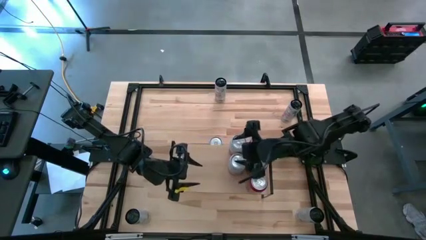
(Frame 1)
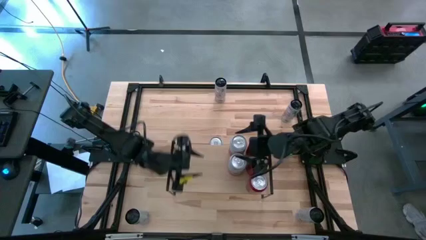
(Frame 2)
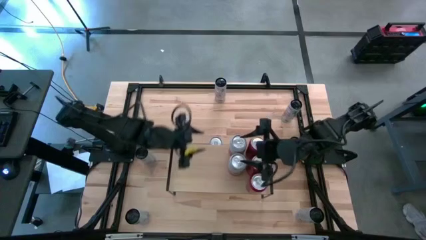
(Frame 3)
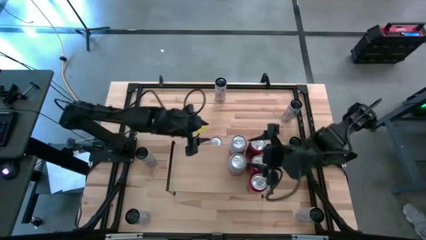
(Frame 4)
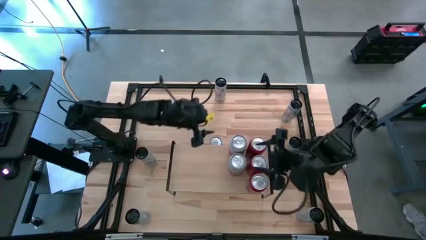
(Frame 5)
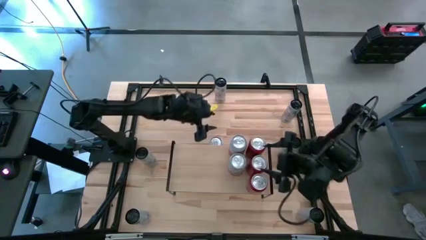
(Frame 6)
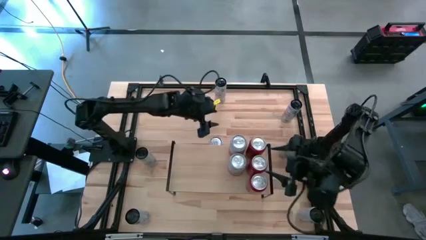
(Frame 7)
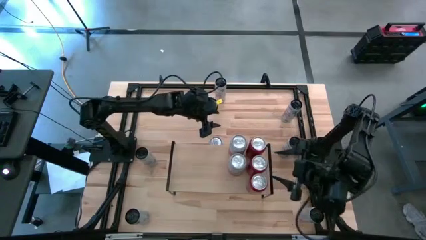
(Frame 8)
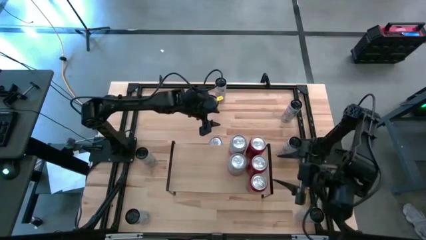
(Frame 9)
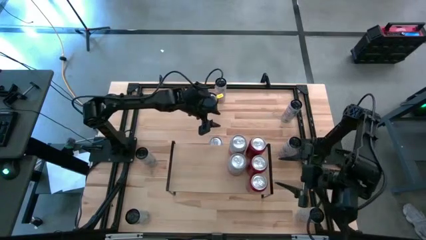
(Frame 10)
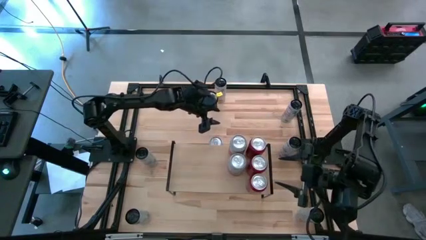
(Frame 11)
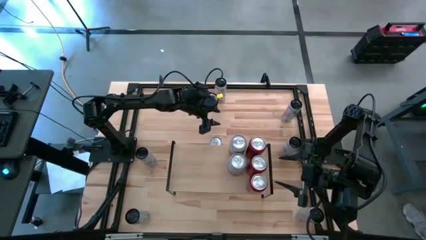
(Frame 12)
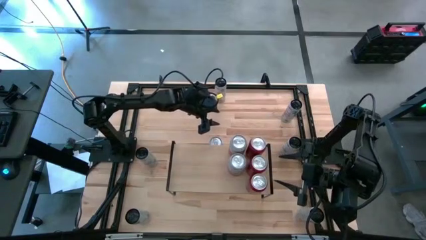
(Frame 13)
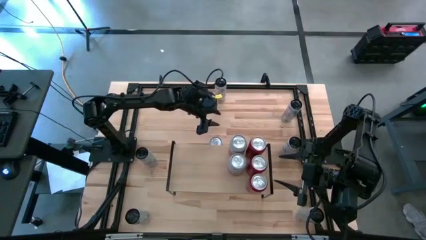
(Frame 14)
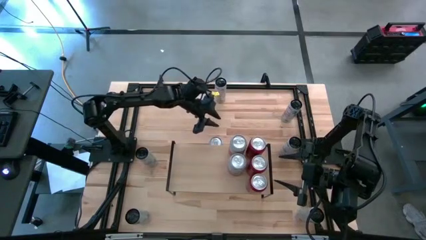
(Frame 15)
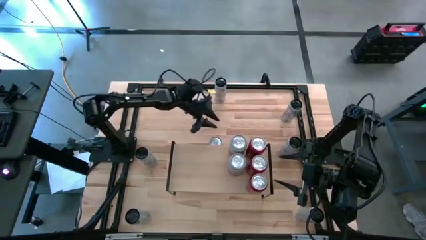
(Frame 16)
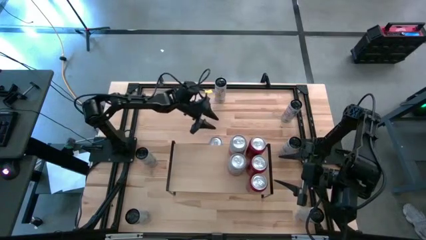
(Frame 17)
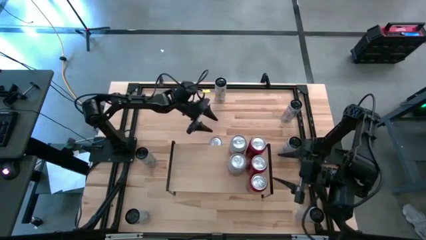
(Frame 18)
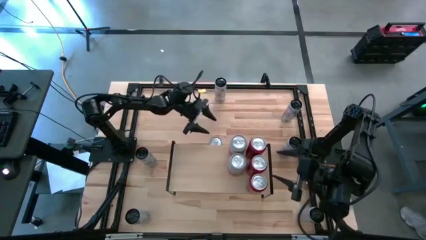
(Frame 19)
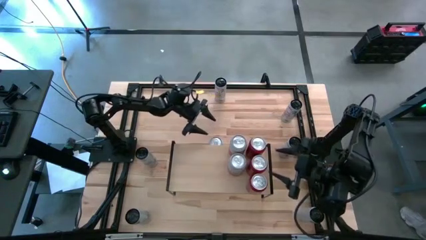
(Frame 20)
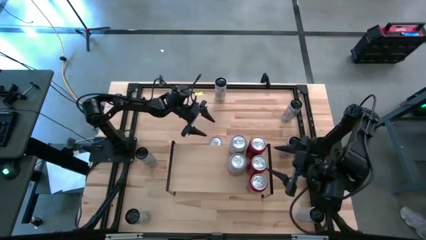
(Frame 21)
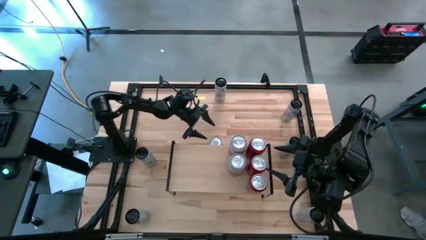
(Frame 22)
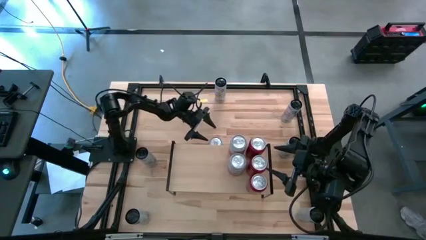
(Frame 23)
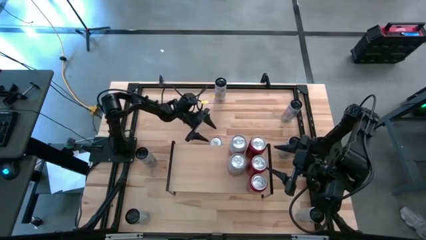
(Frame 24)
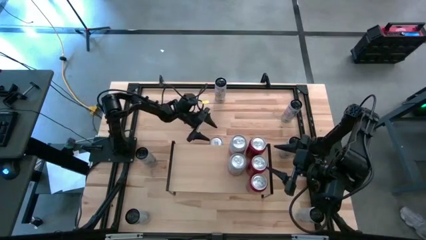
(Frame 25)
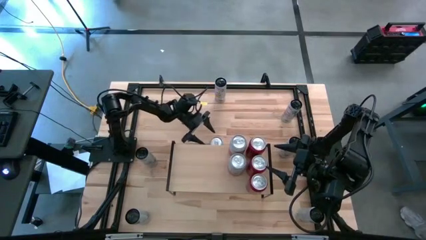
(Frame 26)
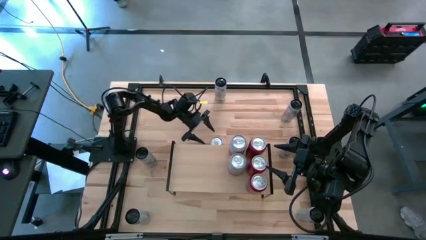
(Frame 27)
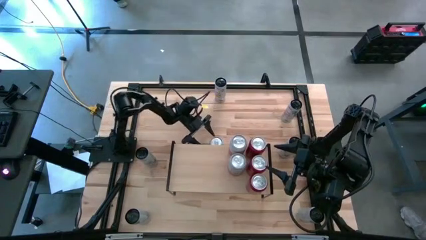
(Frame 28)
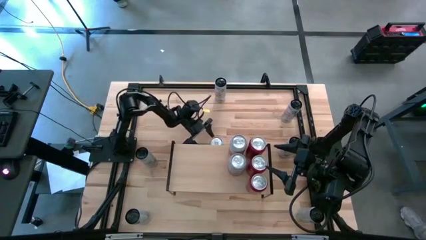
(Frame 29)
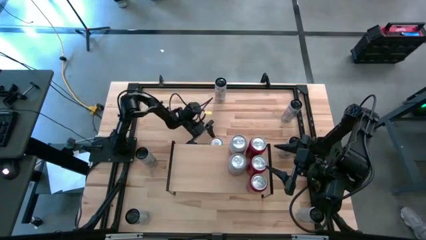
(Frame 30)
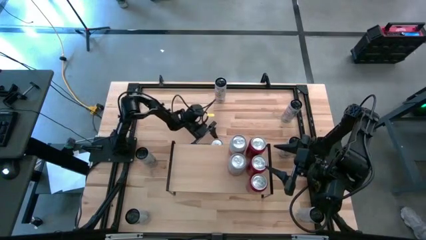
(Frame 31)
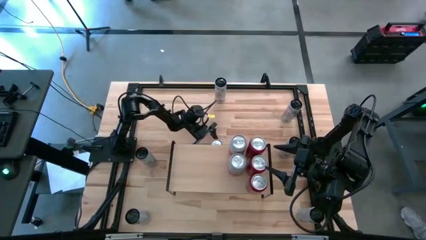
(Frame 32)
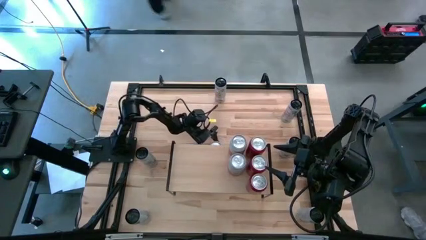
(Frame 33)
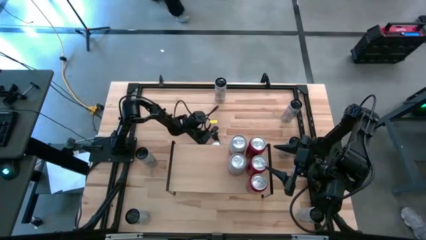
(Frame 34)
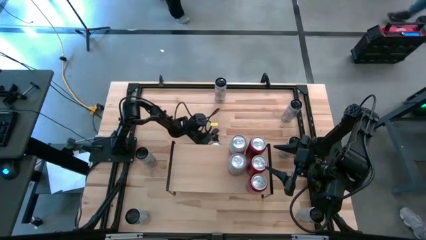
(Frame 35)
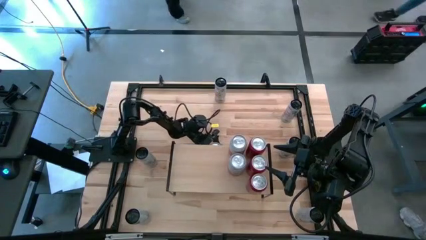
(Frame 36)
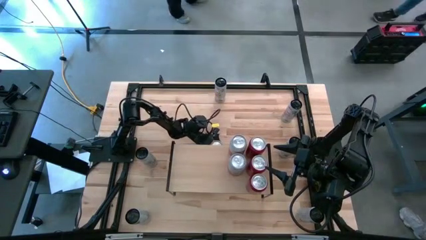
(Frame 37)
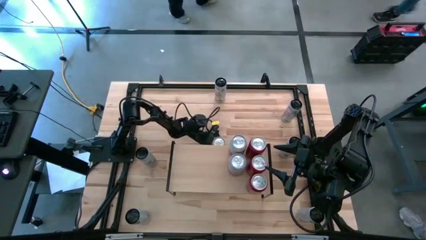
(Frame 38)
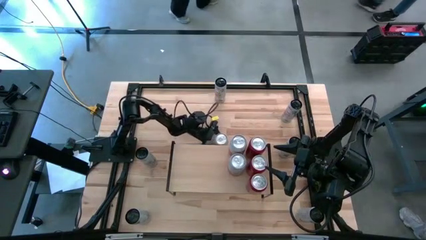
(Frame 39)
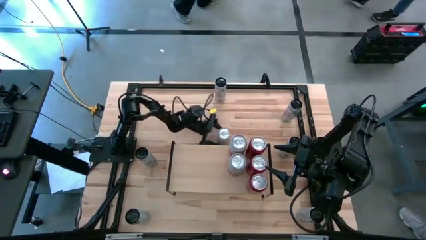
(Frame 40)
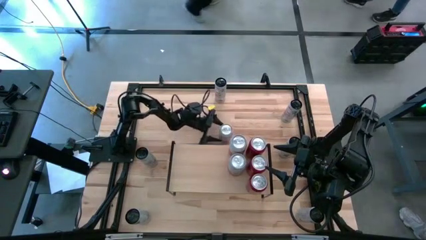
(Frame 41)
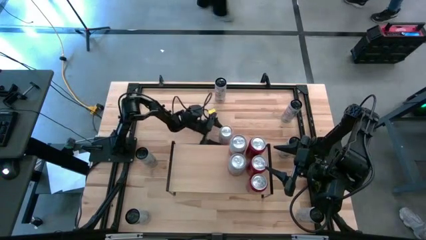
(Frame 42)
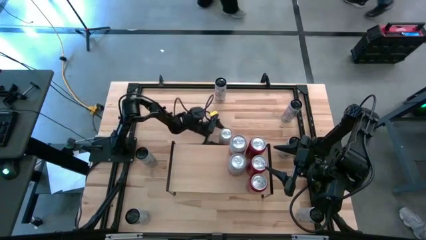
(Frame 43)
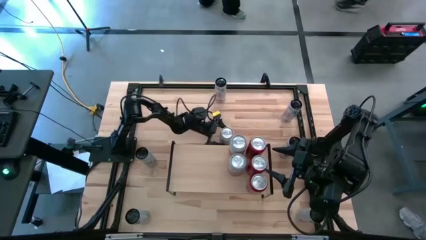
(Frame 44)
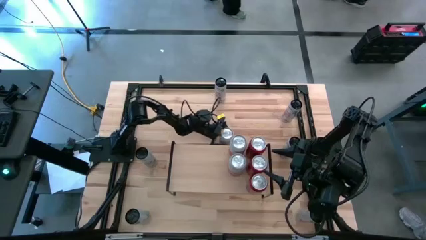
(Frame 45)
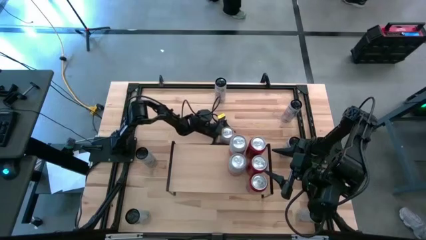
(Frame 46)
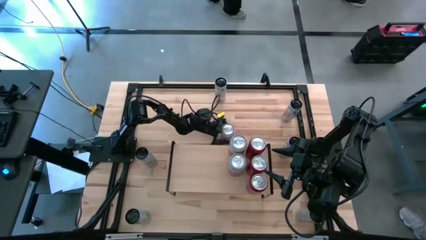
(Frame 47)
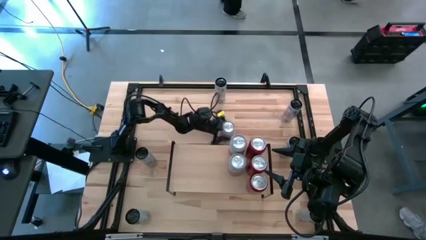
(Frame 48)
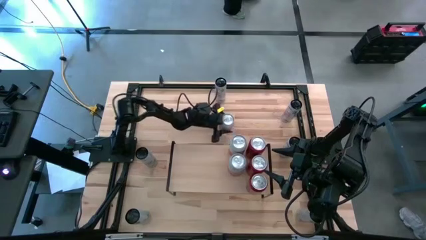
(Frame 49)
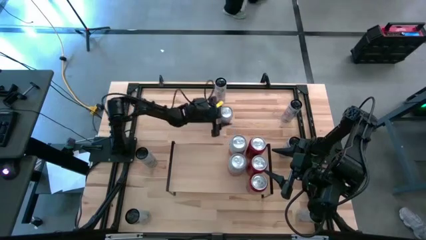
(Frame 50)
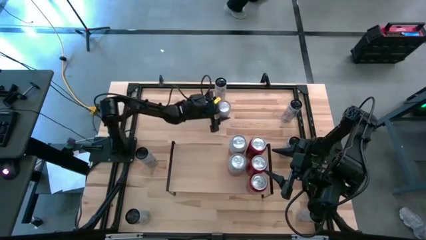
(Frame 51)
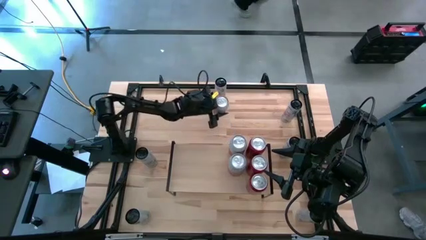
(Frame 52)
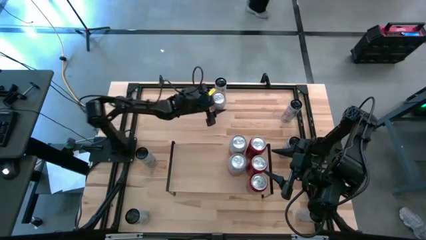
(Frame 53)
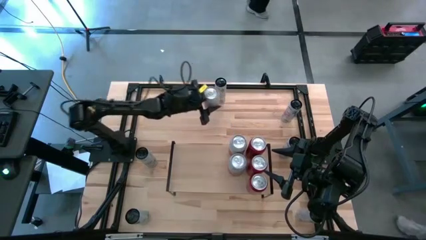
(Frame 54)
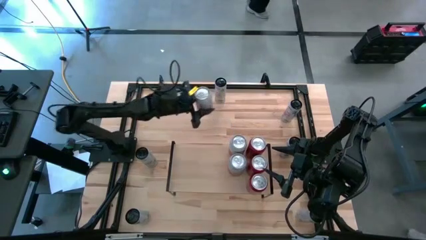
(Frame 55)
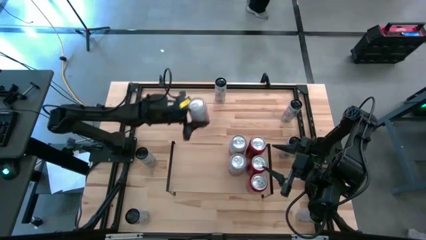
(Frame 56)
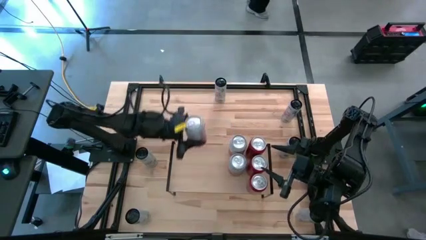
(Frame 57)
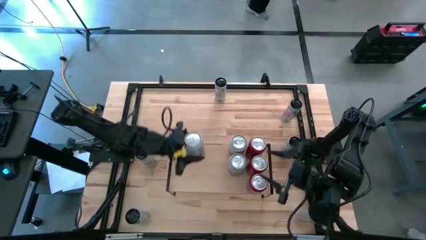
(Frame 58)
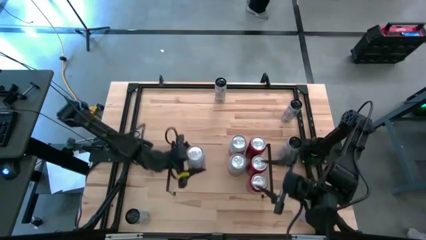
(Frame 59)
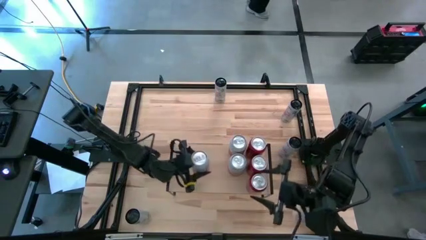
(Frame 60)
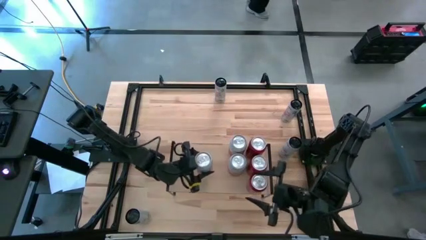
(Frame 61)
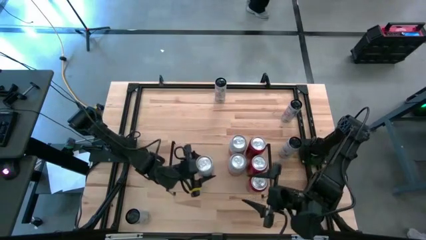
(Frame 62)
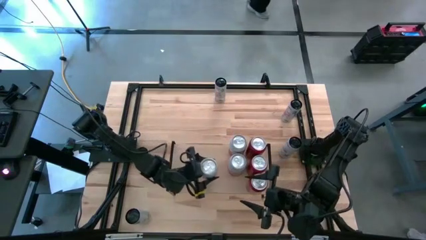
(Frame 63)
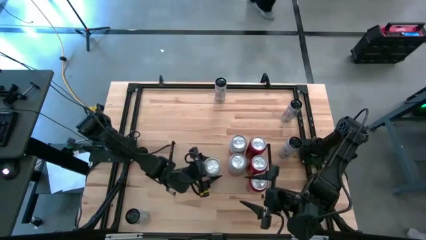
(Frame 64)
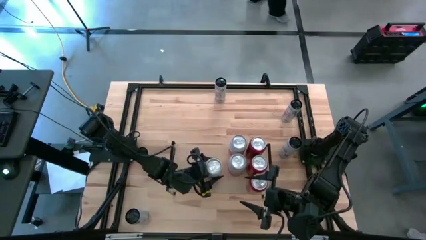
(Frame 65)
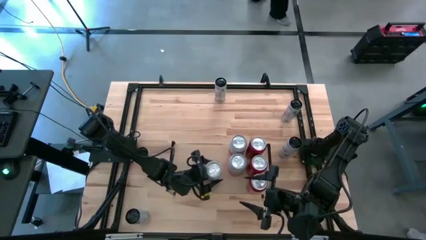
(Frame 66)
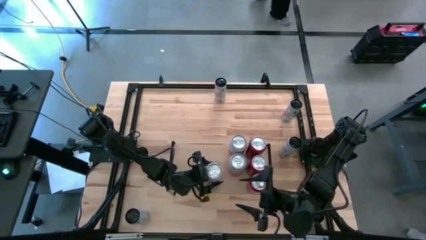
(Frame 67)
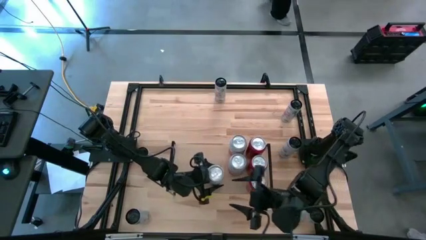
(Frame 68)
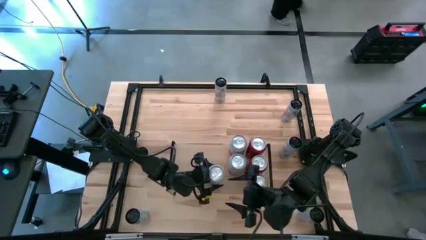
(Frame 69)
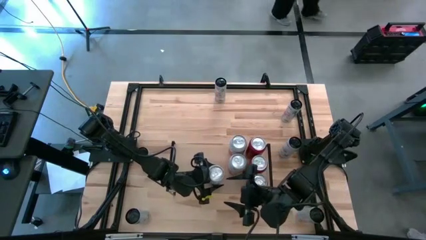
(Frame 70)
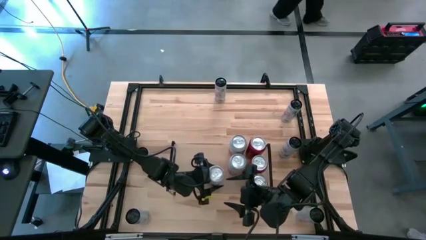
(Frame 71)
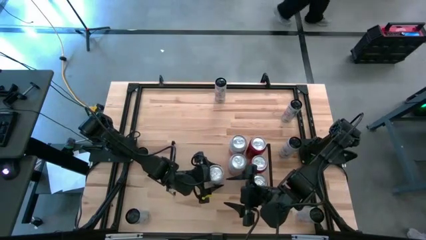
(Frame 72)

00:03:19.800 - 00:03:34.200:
Task: Place canned beverage on shelf
Put the pink-white soda can on the shelf aligned with the other pink-white soda cans
